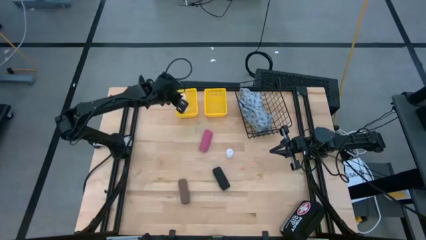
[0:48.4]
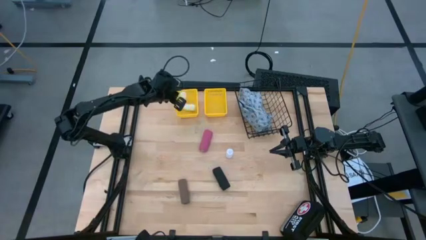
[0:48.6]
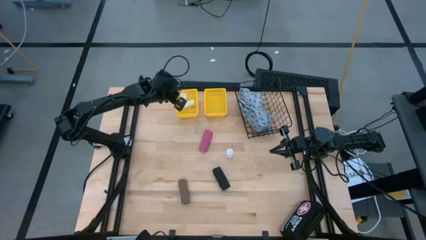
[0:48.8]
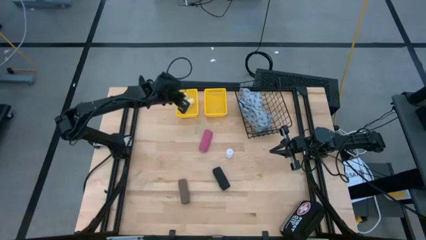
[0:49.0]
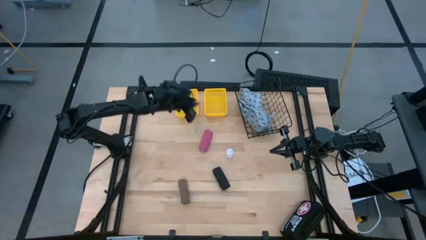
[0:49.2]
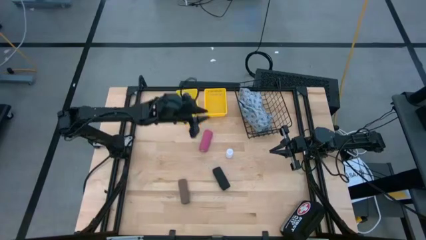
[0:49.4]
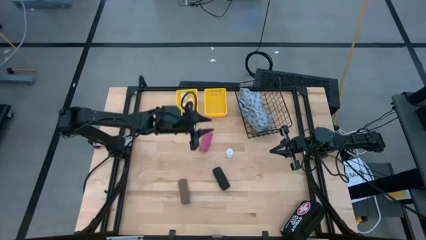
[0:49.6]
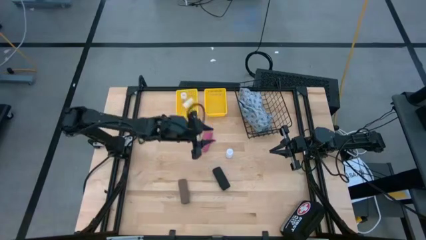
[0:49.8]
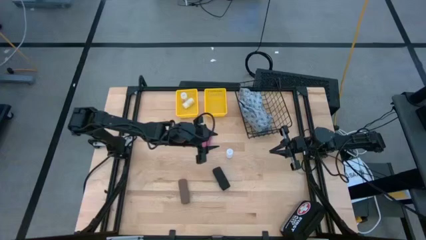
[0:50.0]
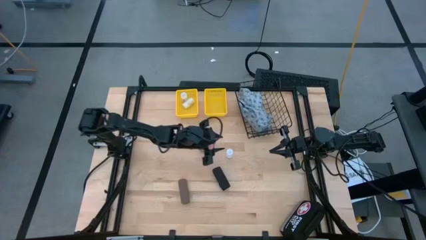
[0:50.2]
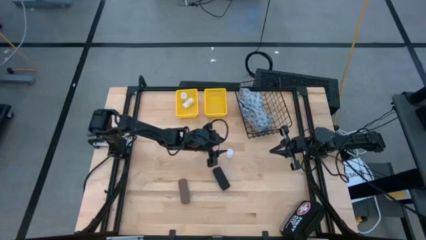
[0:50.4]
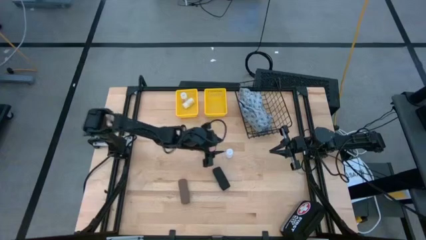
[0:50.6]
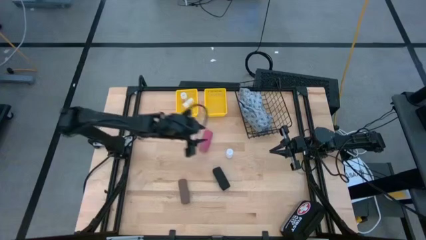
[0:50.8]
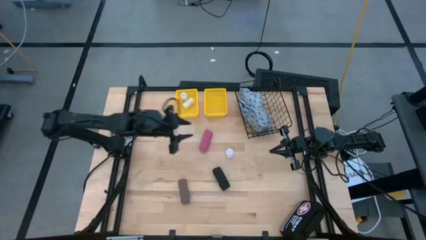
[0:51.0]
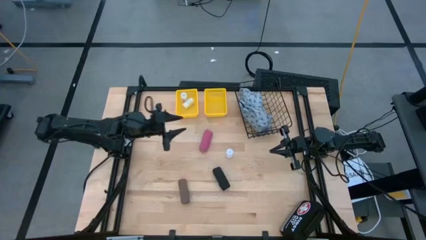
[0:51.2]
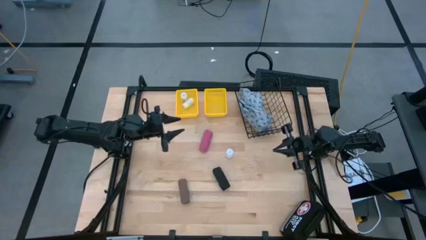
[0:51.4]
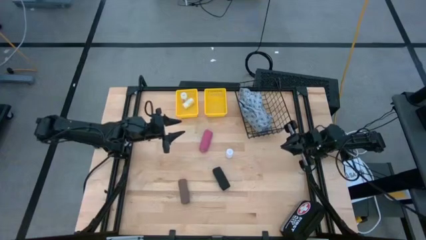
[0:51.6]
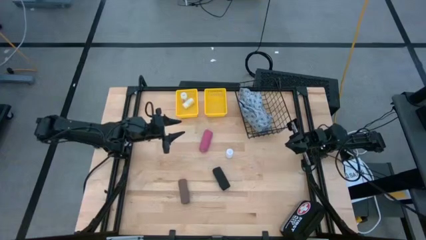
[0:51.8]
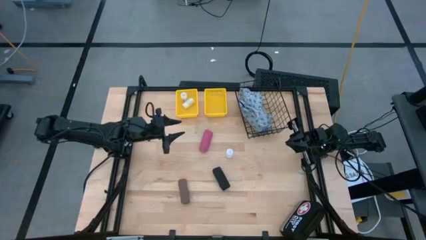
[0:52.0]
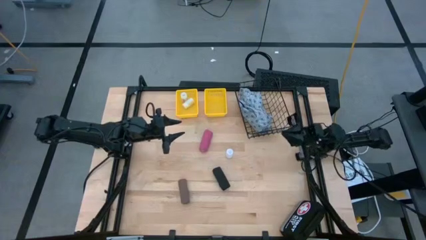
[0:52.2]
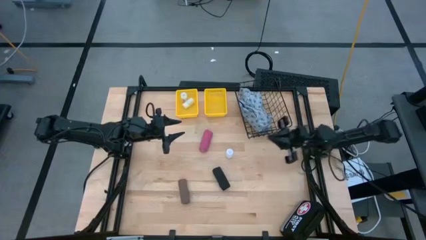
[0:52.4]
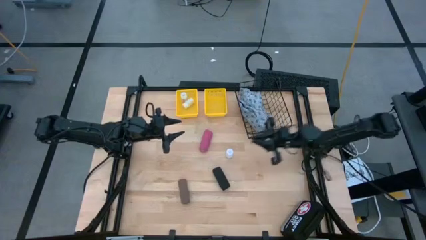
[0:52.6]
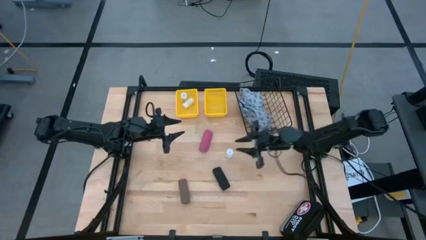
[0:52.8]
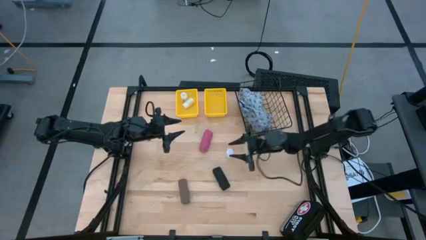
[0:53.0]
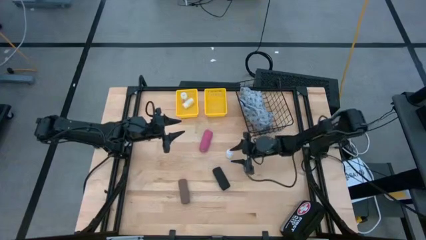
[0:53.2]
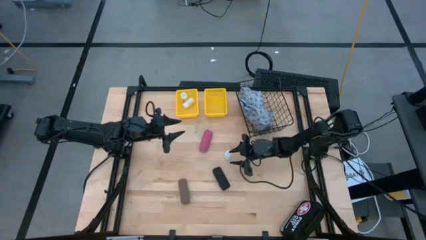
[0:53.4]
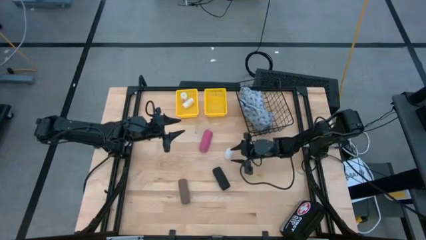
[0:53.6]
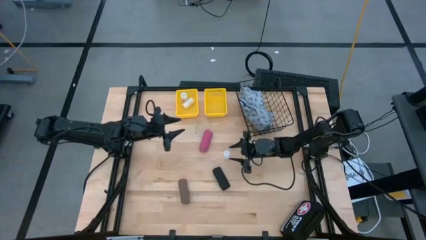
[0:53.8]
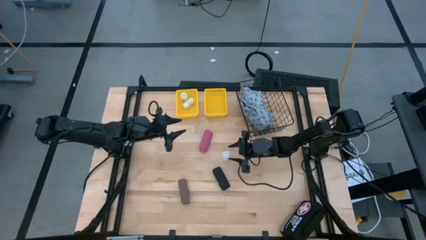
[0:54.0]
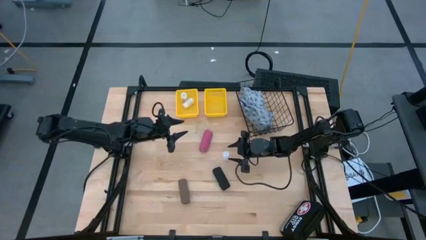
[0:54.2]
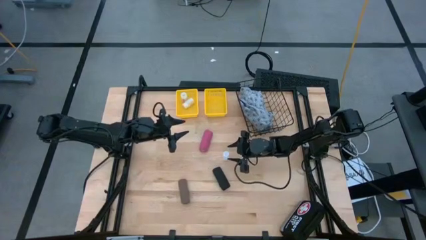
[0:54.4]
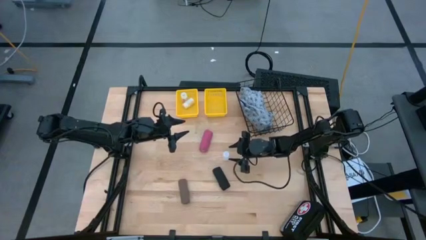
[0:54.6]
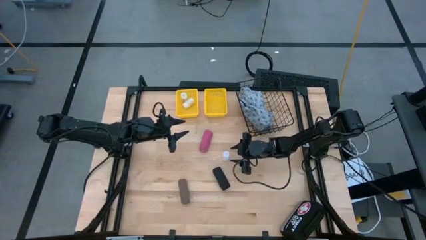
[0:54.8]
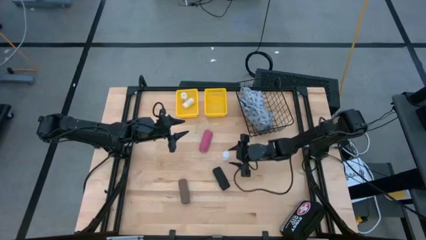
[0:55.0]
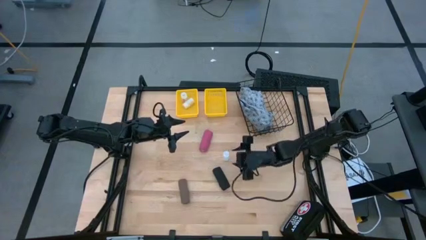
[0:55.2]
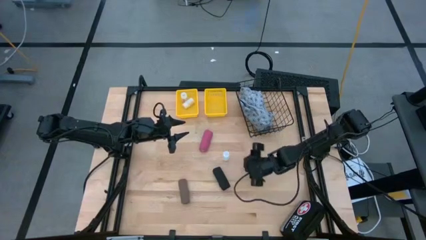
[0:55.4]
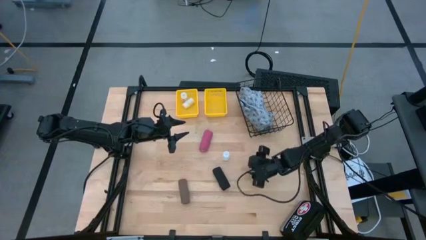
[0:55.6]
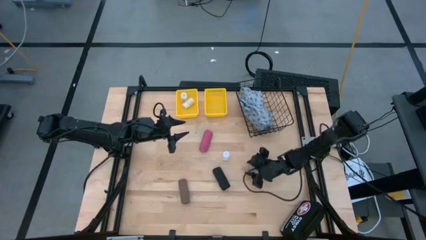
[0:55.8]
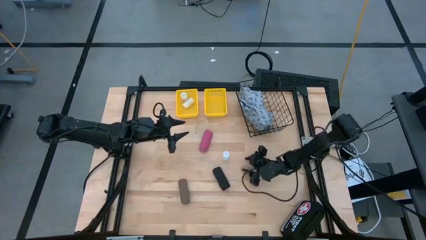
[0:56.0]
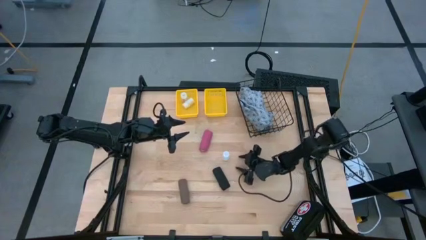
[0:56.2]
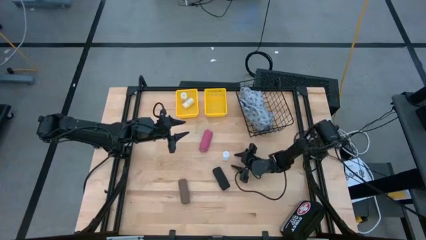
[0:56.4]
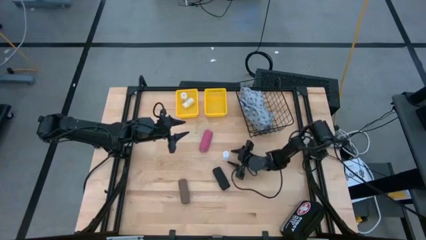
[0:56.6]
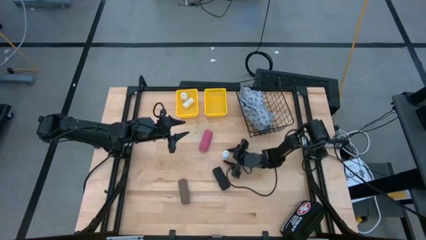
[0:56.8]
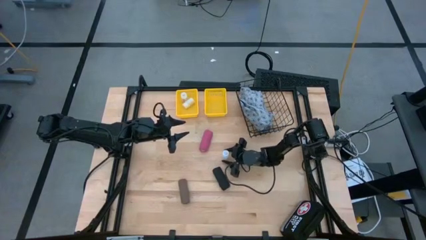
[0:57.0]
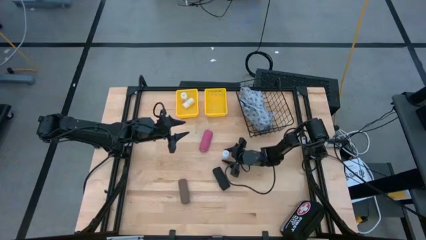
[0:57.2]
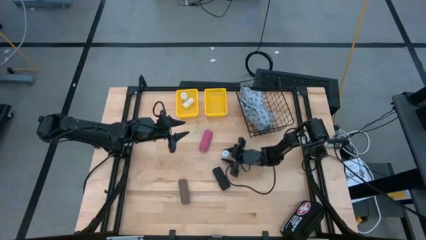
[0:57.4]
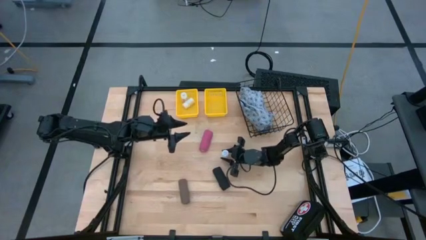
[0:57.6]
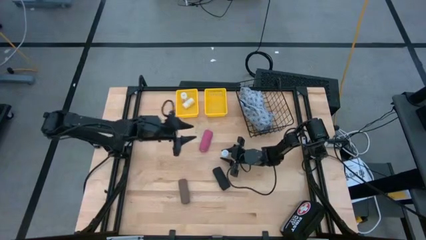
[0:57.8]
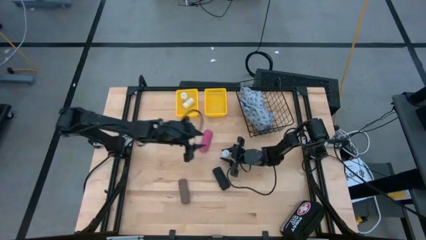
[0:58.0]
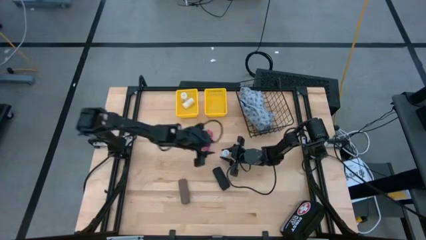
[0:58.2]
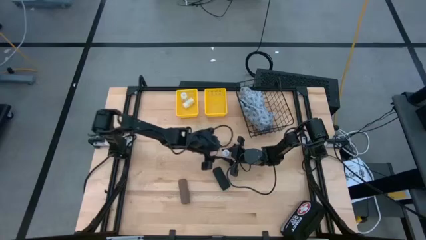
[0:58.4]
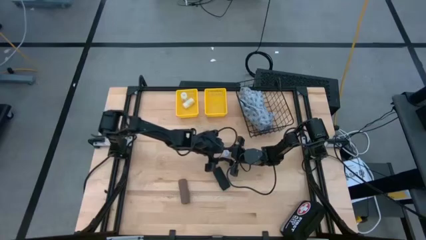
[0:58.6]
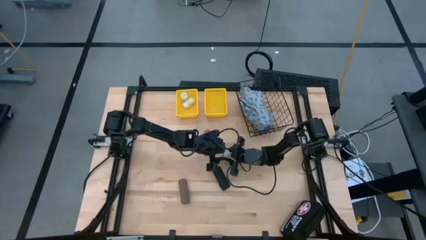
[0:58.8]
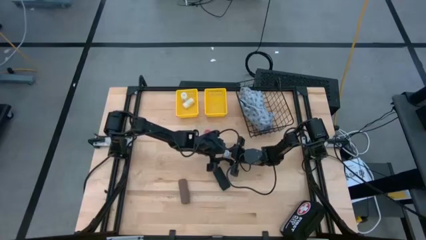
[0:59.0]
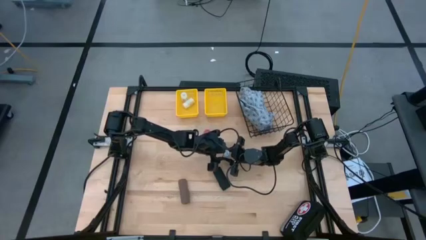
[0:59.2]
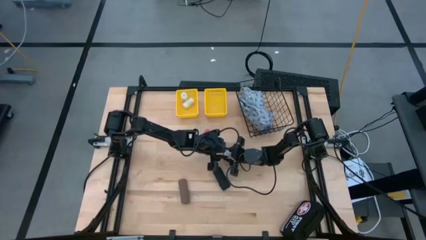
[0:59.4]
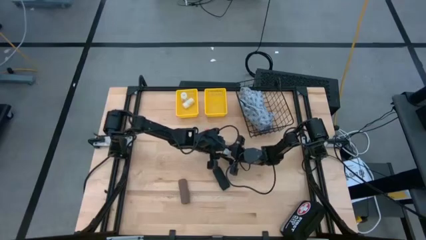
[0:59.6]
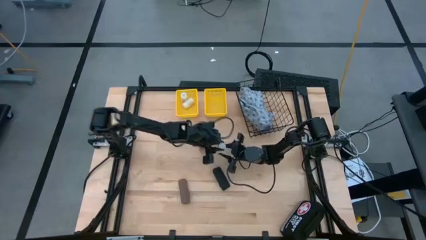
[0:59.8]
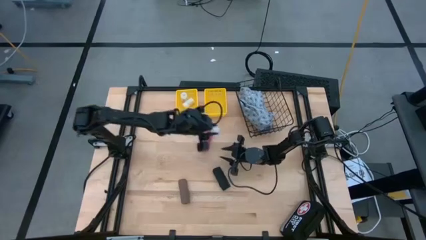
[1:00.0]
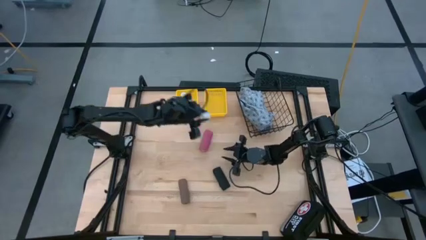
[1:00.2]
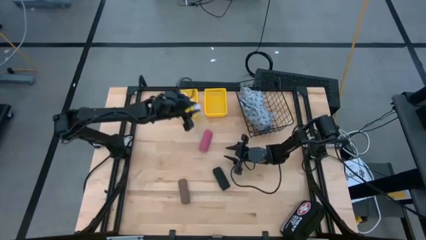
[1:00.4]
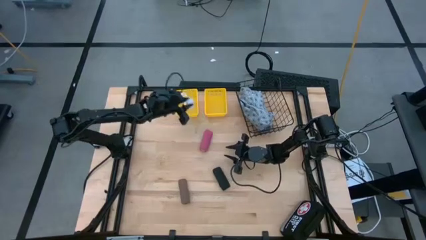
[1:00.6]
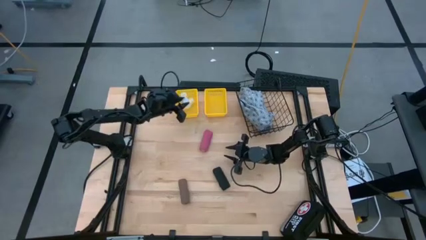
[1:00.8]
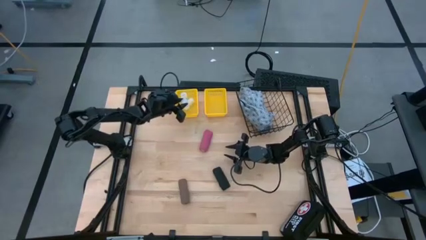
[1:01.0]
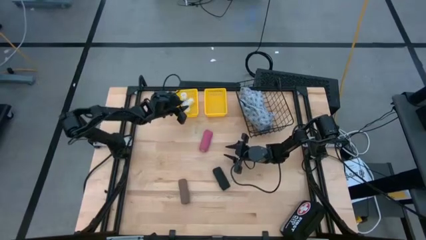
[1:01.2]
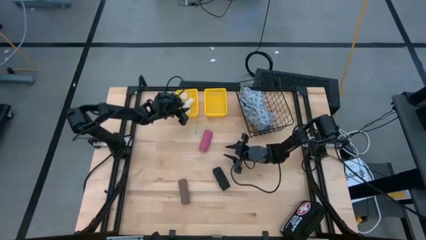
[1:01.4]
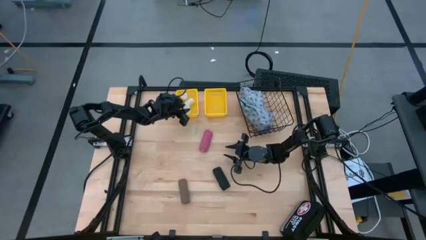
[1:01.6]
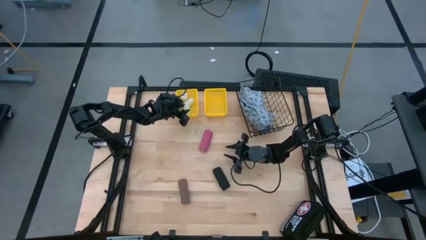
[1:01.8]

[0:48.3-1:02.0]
Task: Pick & Place Medicine items
Put the pill bottle into the left yellow basket

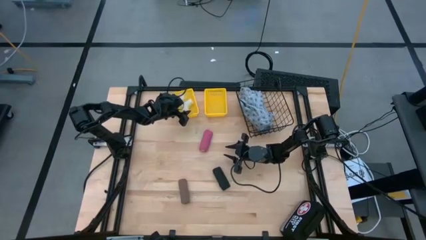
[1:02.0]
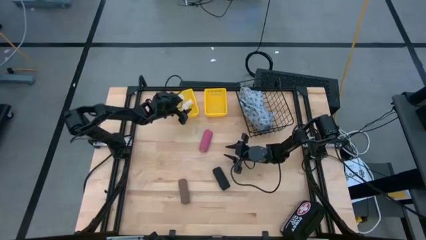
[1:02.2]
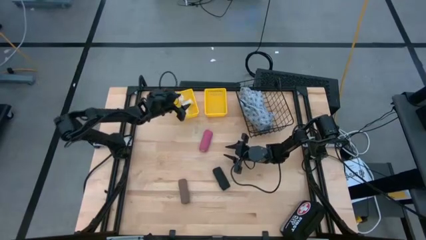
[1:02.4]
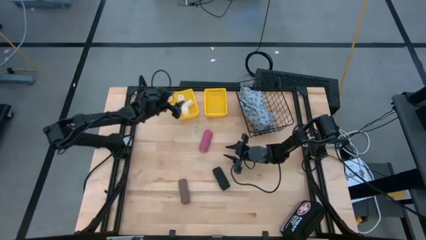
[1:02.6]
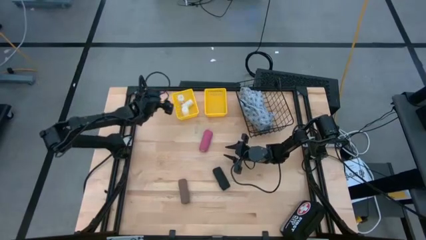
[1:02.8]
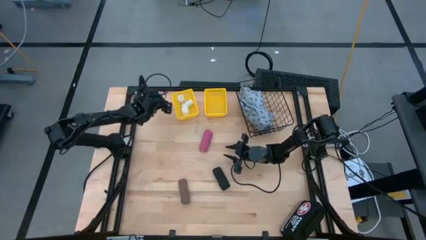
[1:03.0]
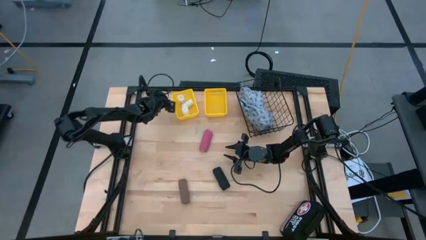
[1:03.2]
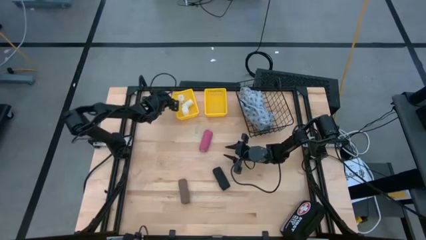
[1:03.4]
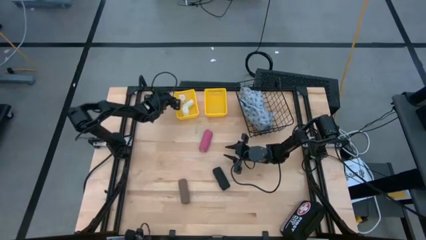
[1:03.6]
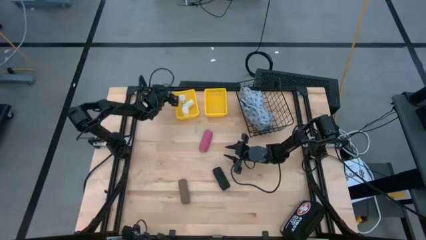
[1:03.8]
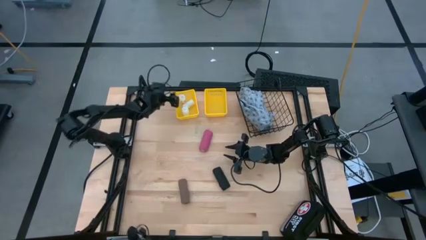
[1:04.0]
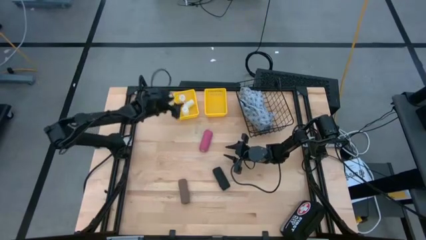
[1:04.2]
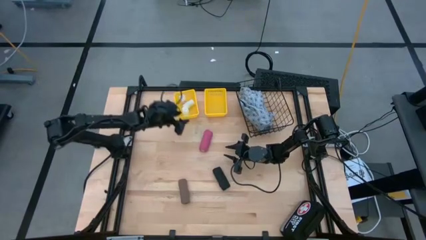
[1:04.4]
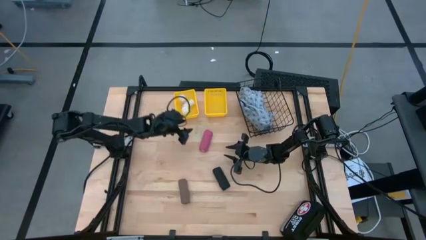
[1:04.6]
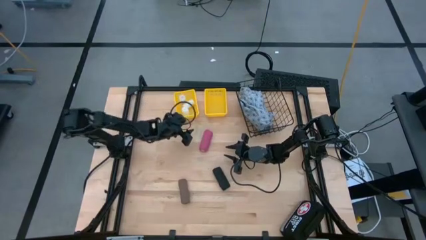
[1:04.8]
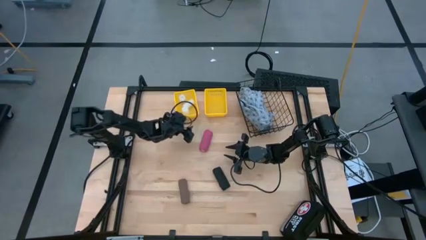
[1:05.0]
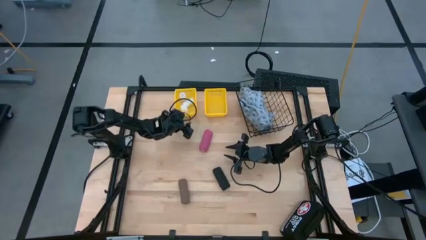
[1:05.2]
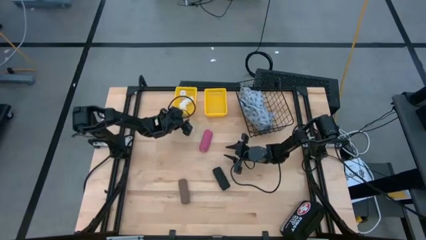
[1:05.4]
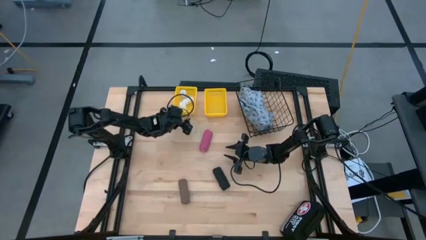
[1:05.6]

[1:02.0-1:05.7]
Adjust the left yellow basket

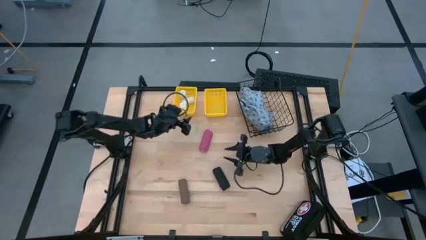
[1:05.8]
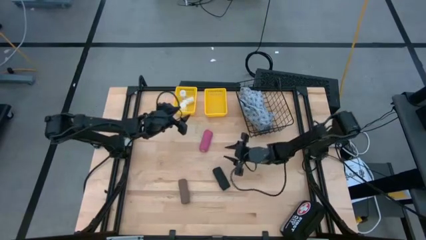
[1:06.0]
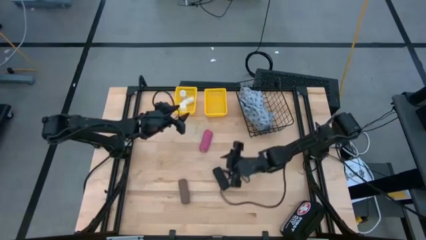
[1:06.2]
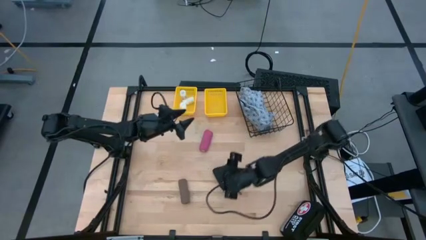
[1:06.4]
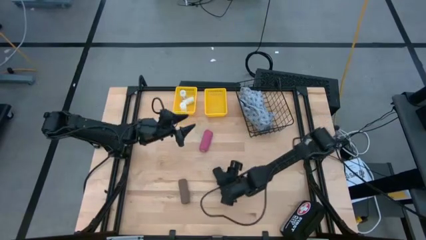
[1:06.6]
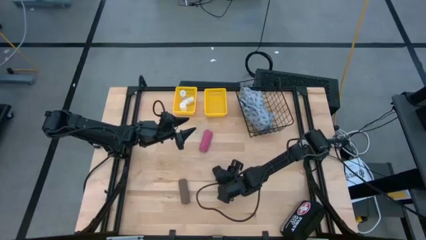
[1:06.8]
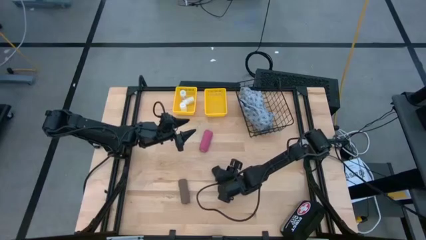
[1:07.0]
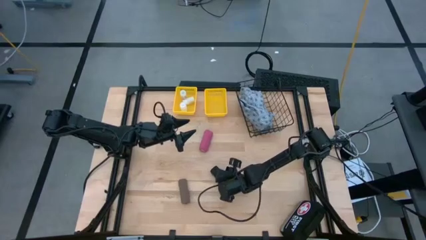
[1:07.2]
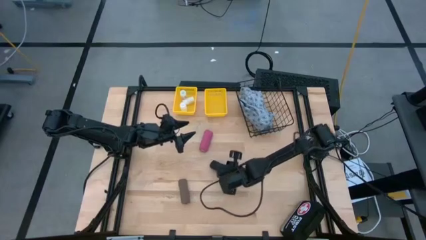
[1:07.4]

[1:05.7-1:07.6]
Put the black bandage into the right yellow basket
